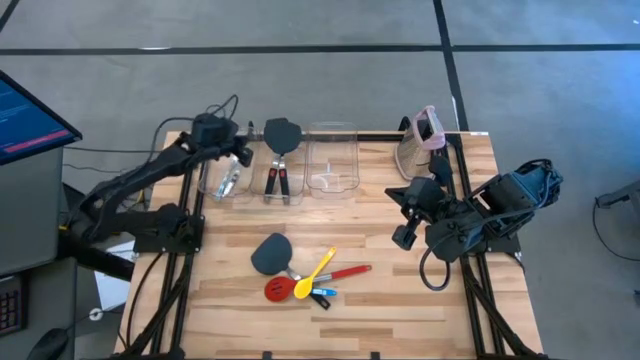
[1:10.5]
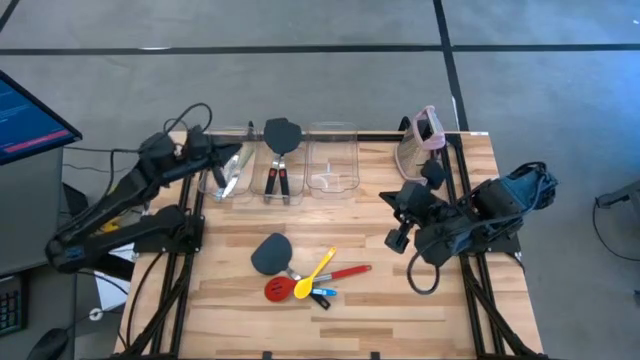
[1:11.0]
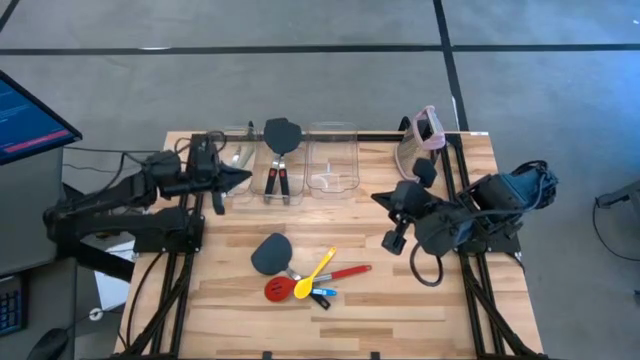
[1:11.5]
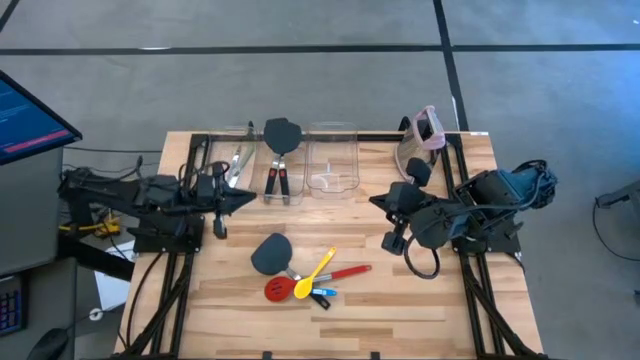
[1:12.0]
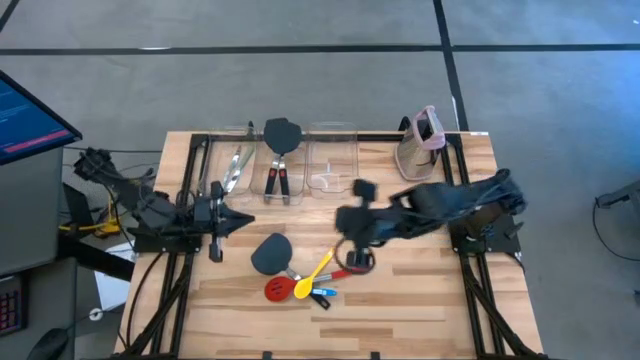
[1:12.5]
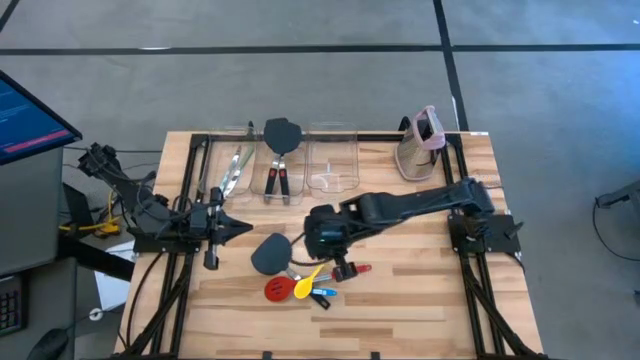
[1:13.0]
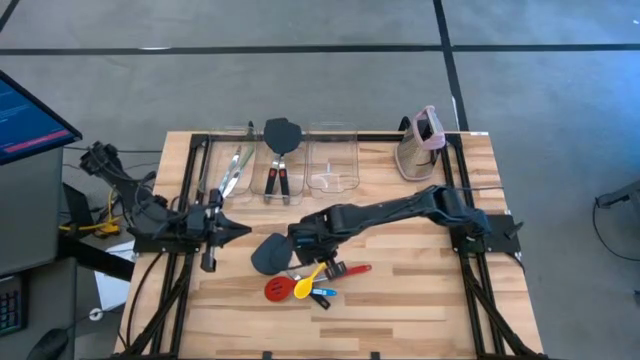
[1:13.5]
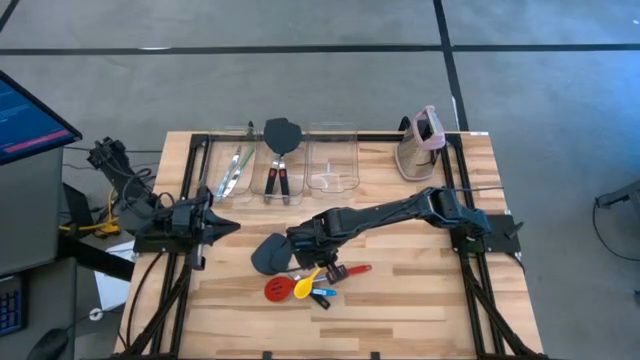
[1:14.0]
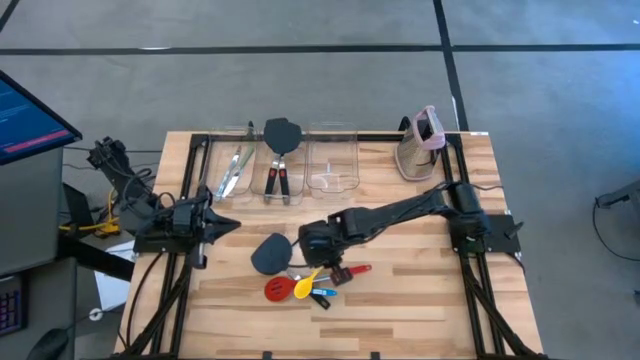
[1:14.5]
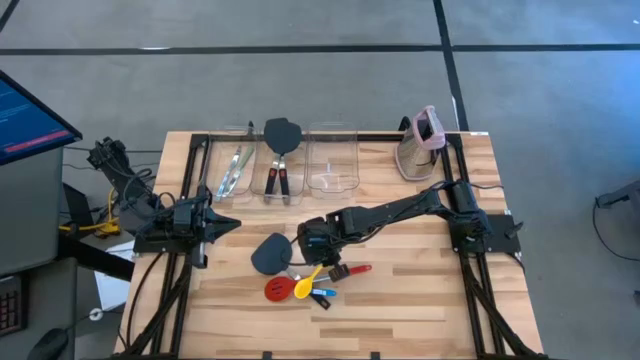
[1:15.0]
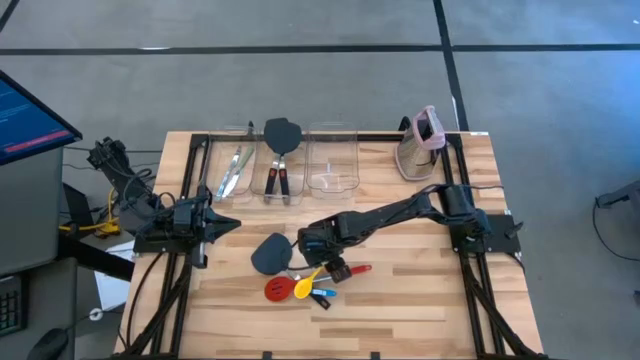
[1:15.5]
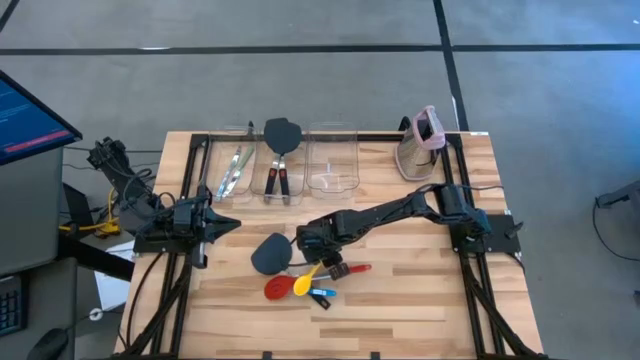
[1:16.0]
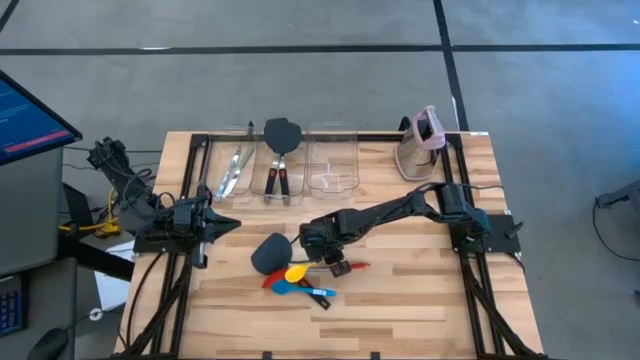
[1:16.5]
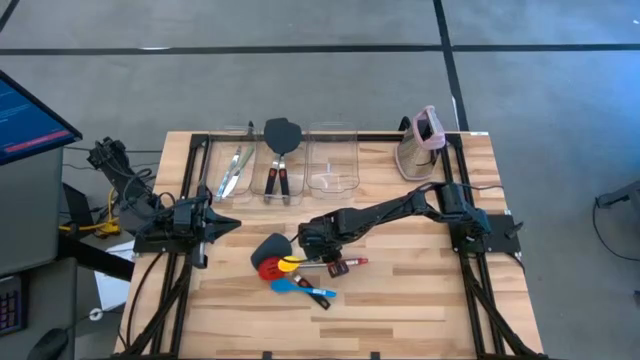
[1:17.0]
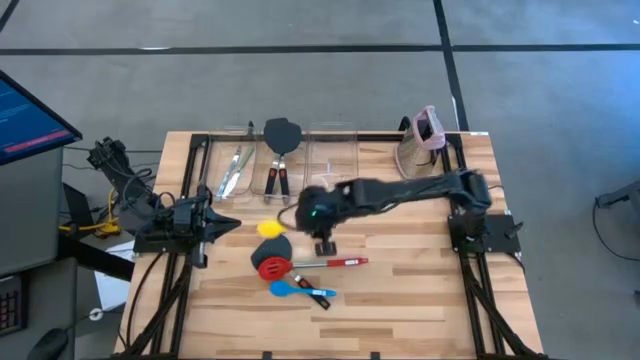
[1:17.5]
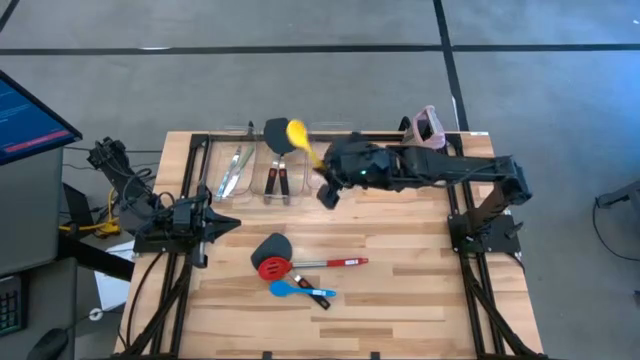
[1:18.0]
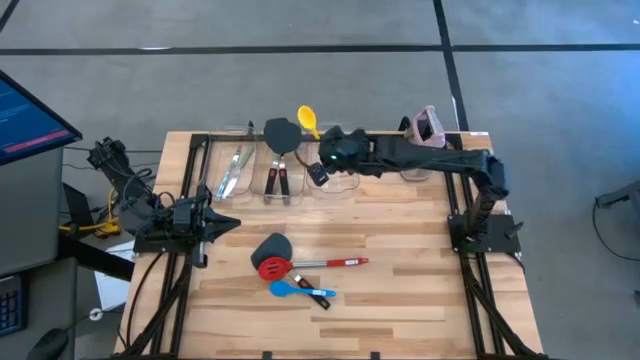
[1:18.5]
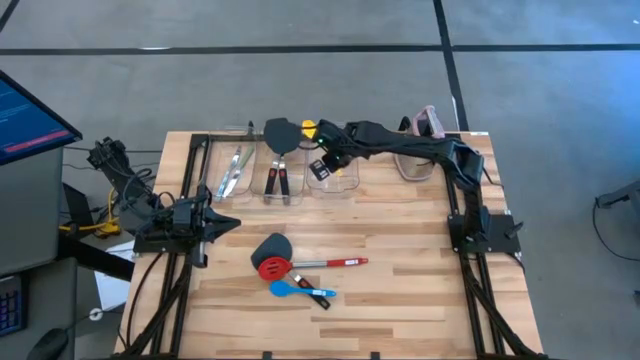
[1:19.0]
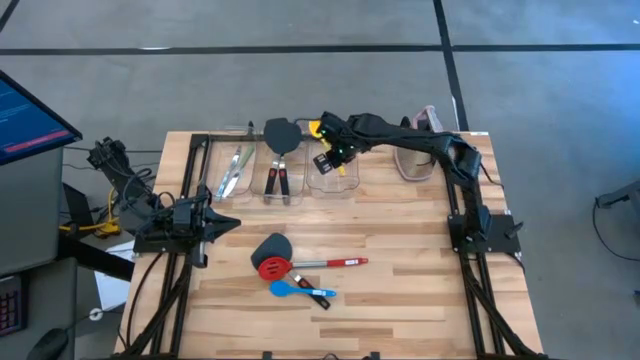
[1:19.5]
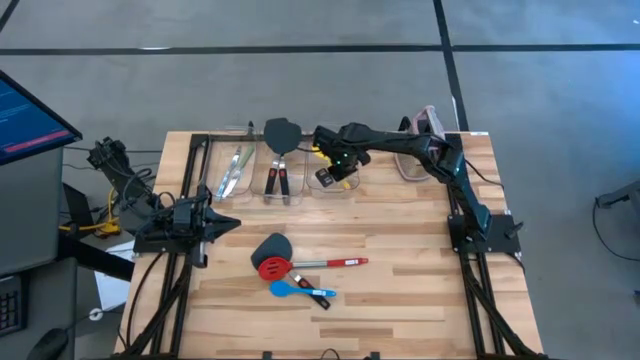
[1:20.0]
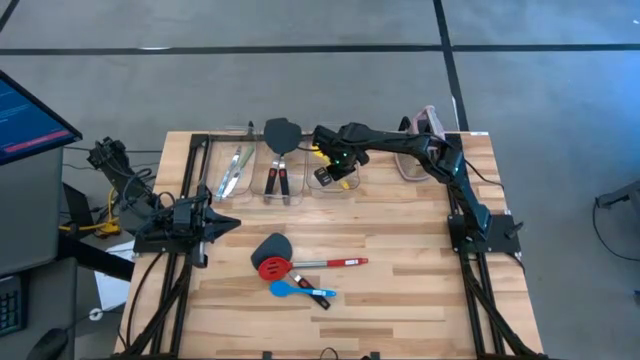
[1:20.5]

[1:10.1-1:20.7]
Task: Pick & Place Kitchen Items
Put the yellow spoon into the right transparent bin

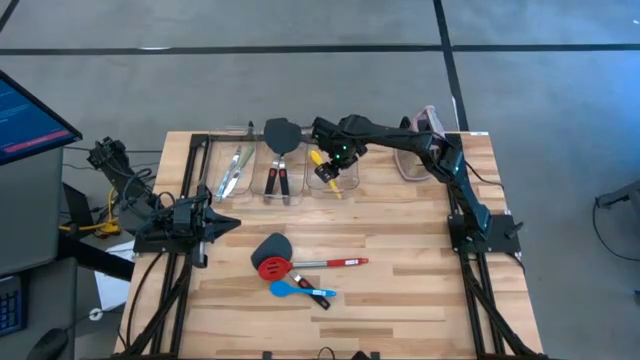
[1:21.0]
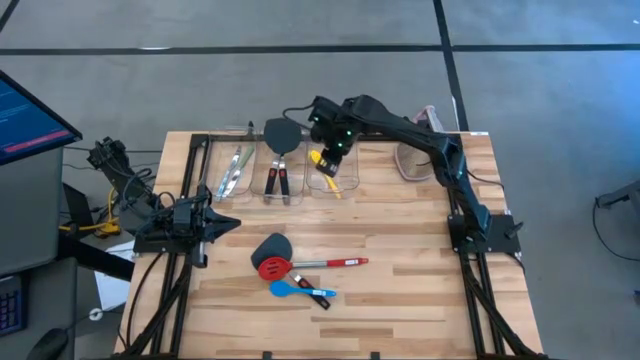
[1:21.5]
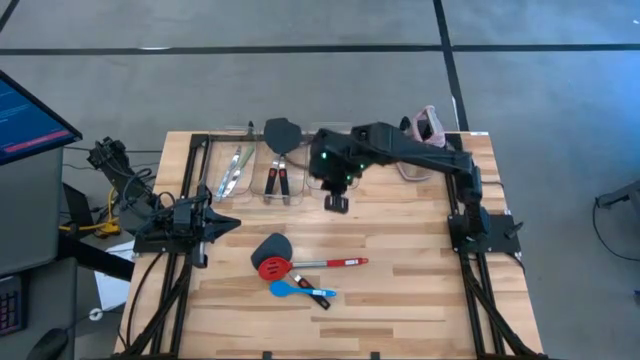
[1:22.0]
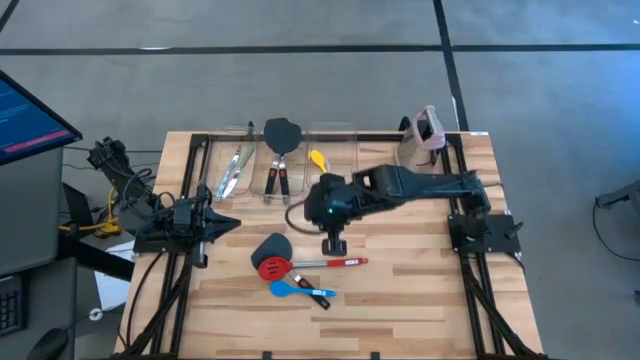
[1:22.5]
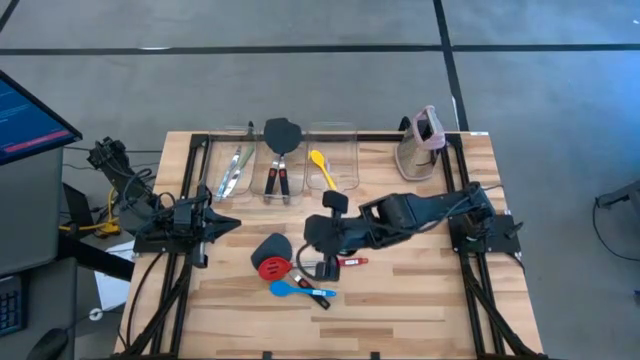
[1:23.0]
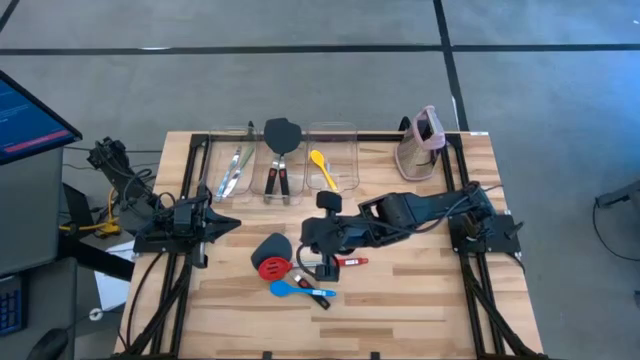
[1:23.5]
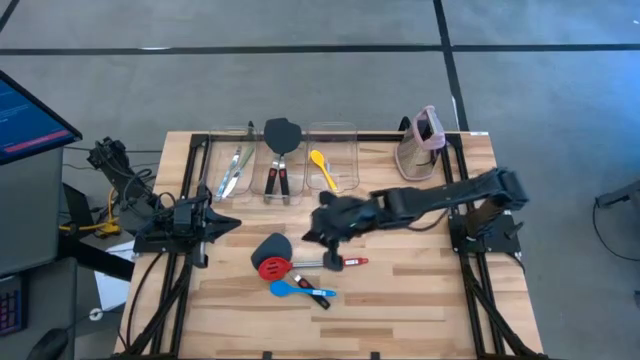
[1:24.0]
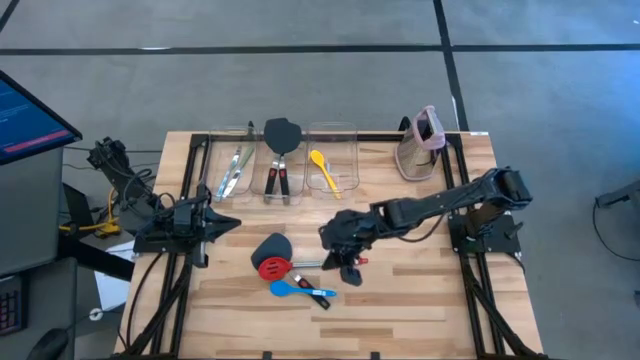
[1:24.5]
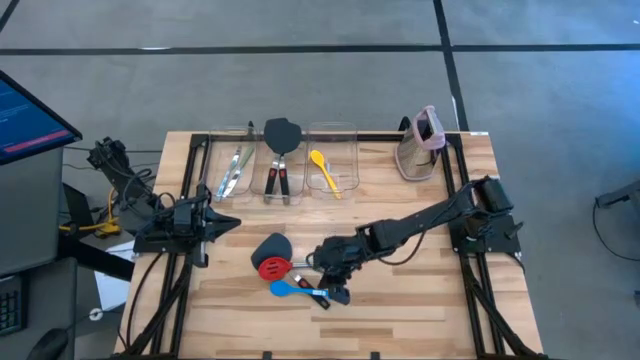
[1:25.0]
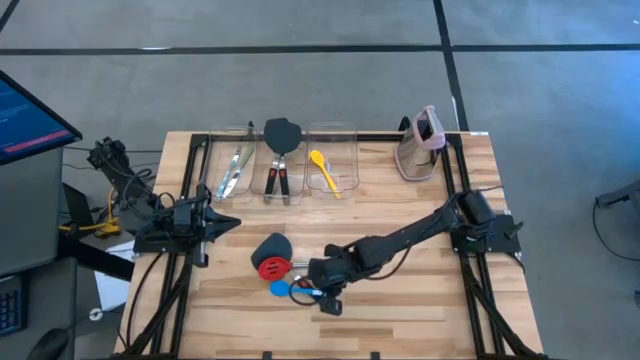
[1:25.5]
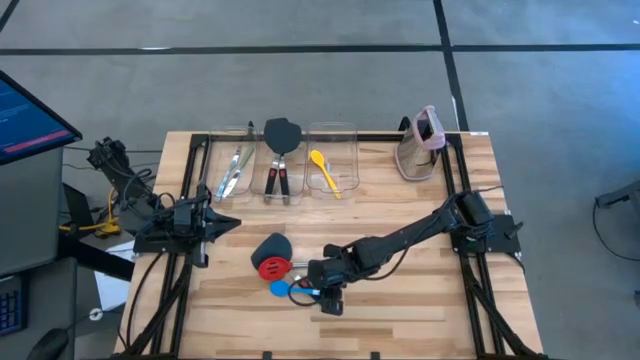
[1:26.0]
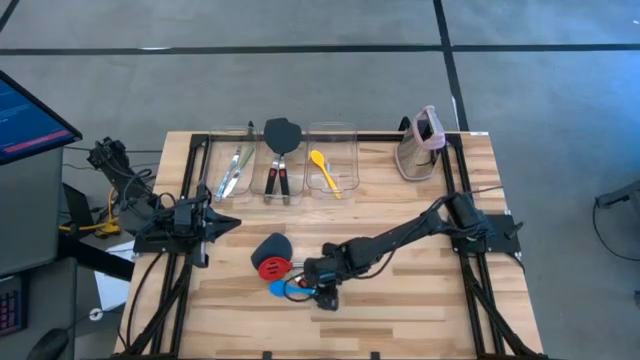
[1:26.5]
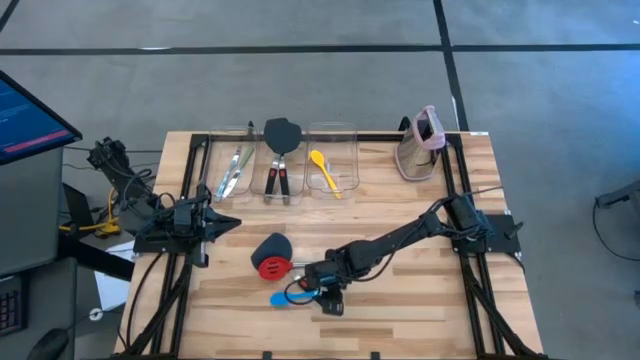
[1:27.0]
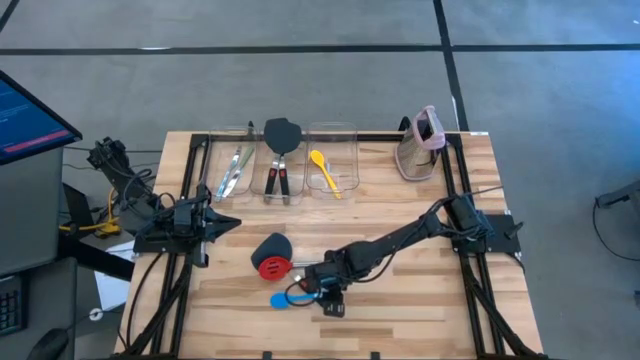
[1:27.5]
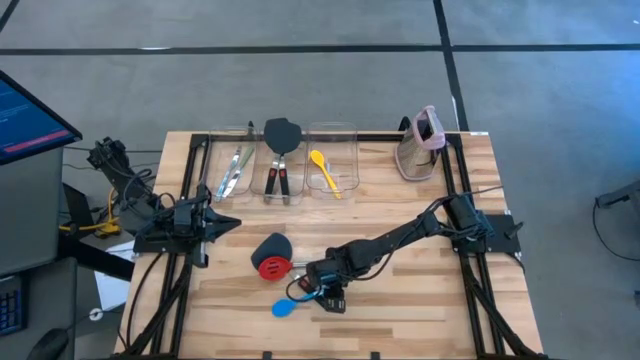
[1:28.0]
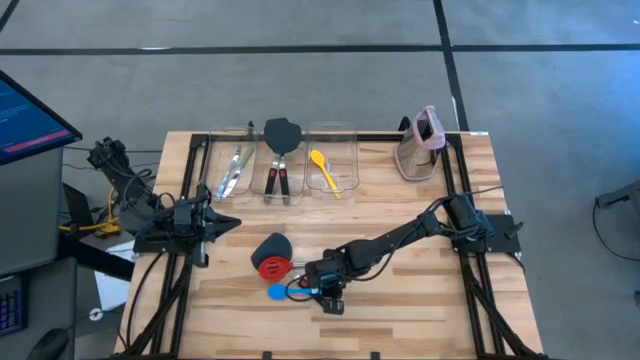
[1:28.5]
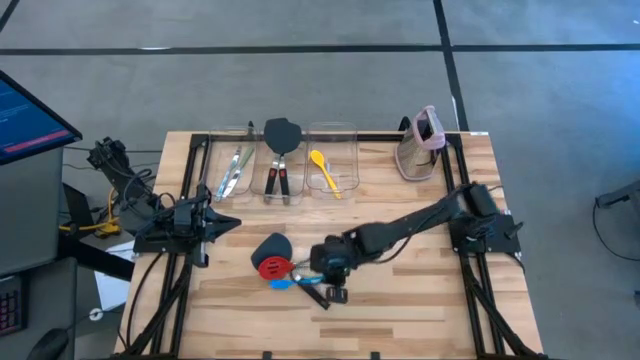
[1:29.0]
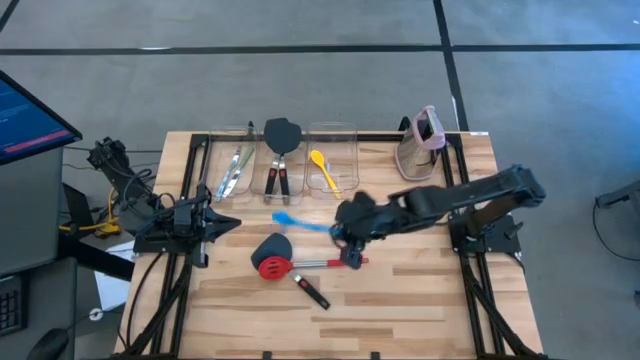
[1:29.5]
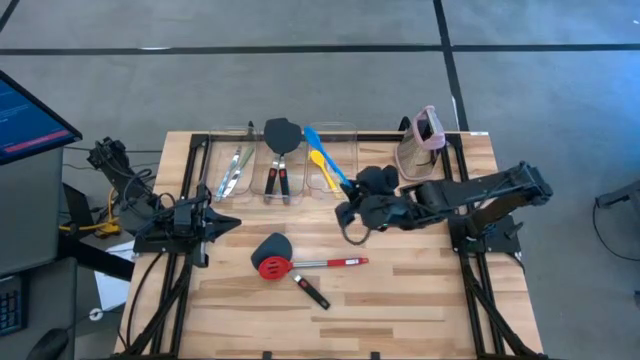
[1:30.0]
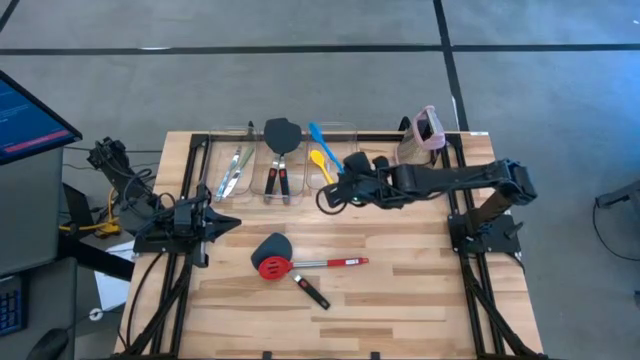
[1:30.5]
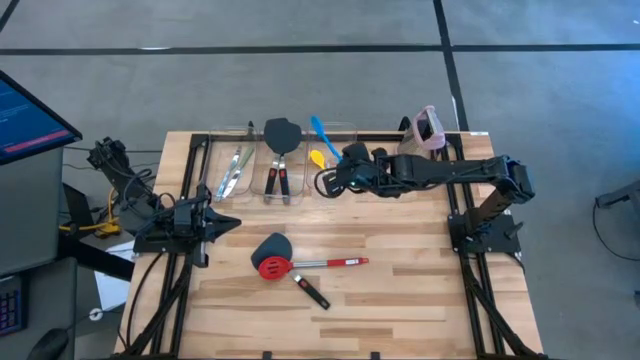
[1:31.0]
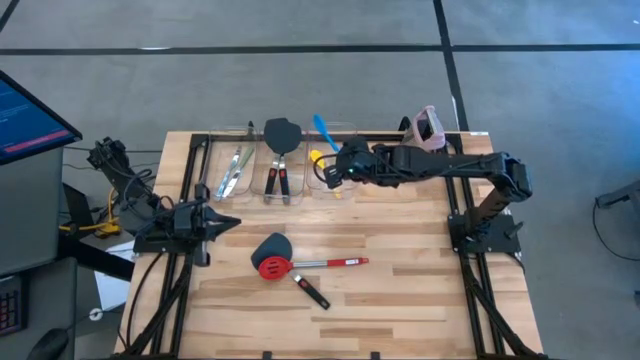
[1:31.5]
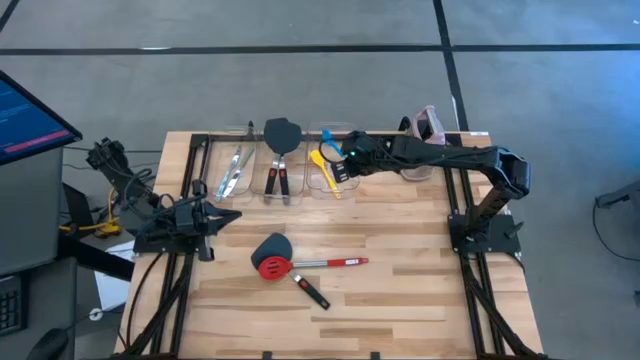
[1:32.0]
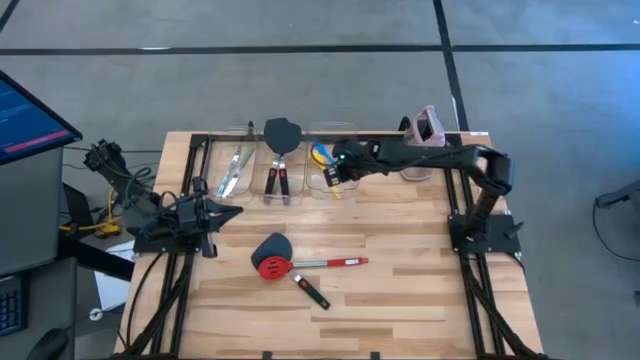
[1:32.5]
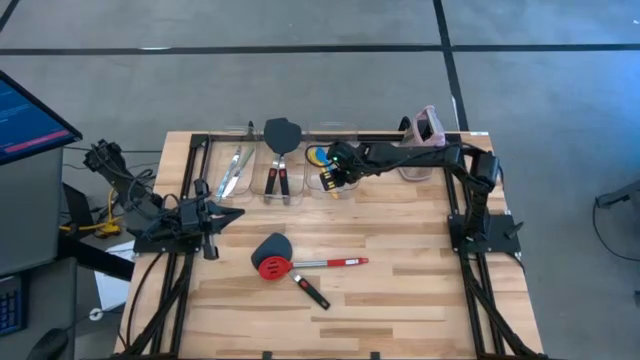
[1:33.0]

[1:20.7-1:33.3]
Put the blue spoon into the right transparent bin
